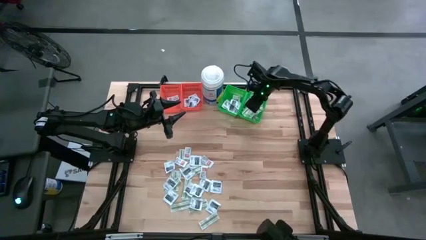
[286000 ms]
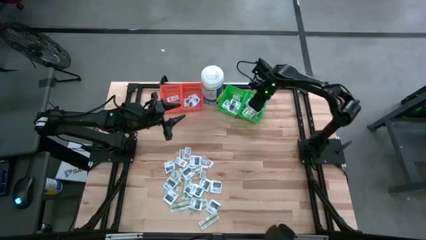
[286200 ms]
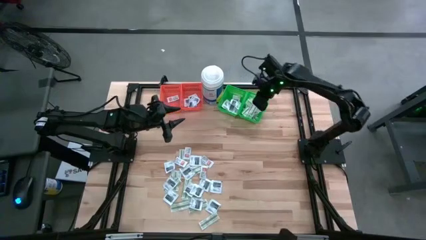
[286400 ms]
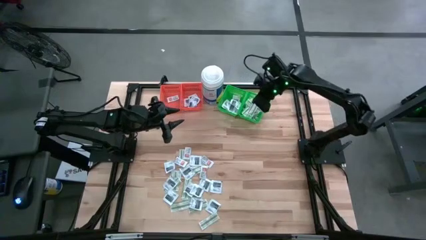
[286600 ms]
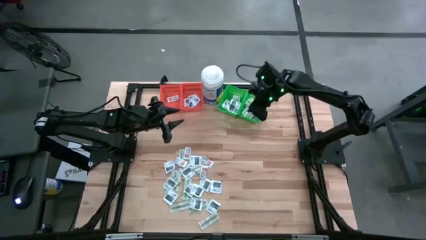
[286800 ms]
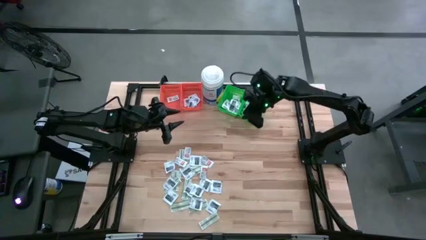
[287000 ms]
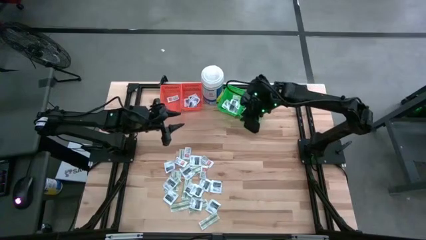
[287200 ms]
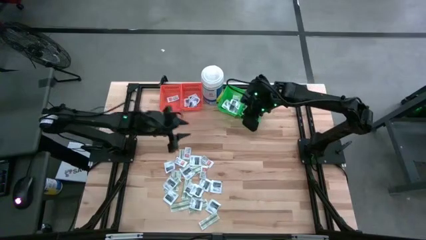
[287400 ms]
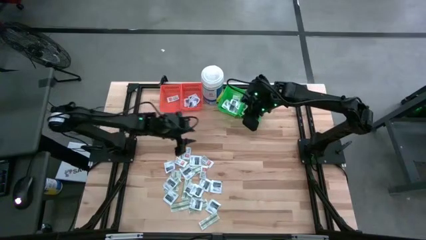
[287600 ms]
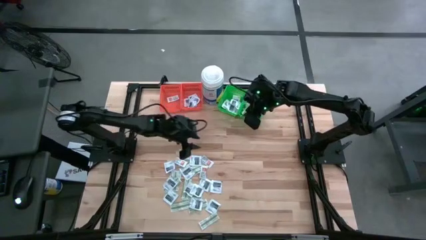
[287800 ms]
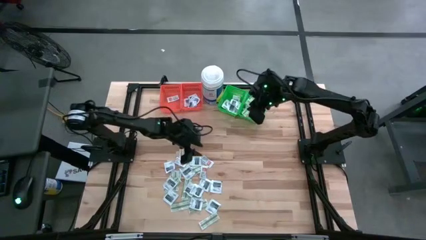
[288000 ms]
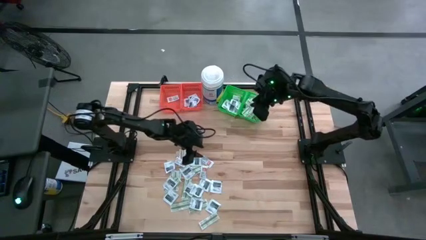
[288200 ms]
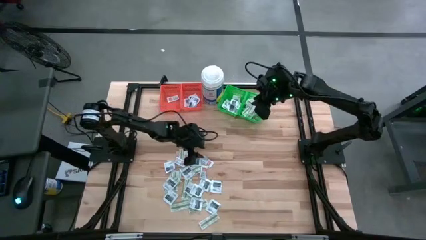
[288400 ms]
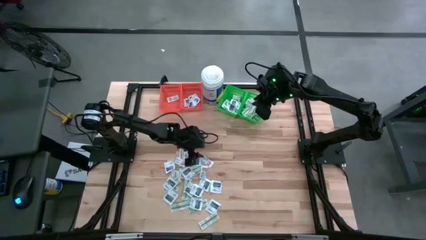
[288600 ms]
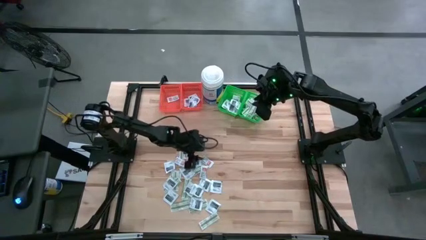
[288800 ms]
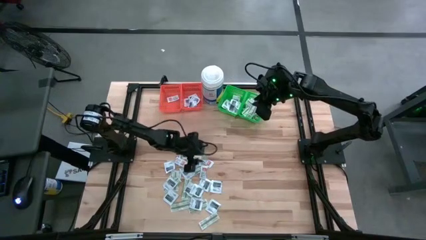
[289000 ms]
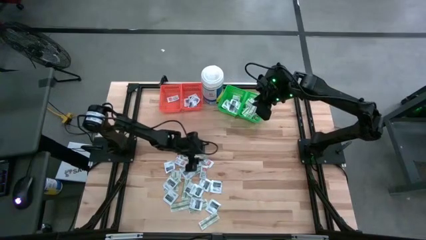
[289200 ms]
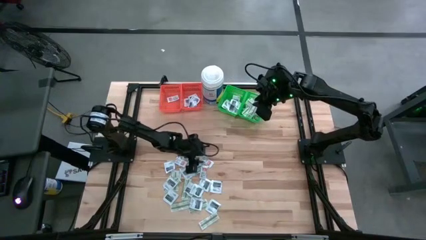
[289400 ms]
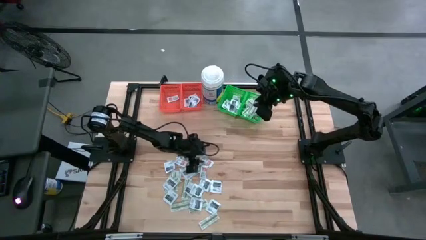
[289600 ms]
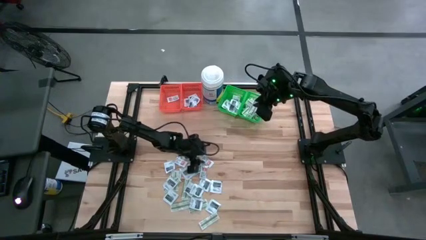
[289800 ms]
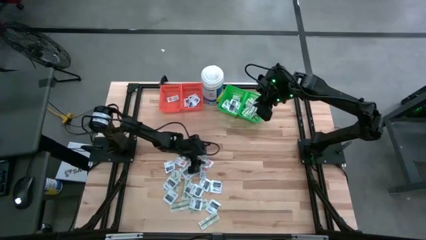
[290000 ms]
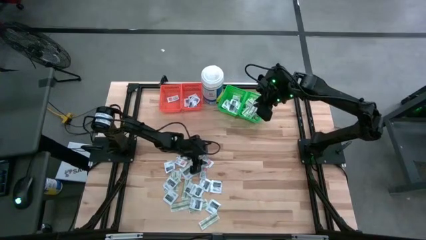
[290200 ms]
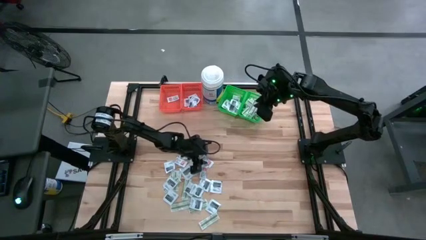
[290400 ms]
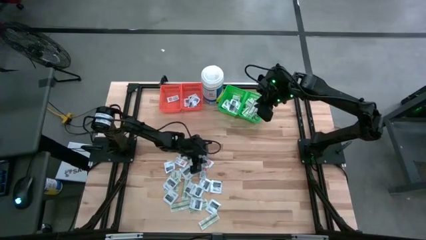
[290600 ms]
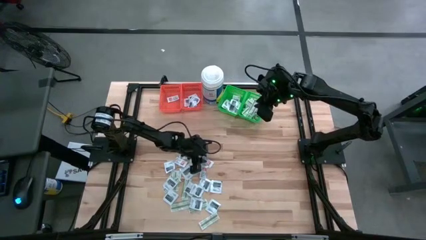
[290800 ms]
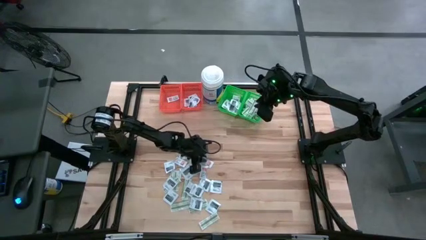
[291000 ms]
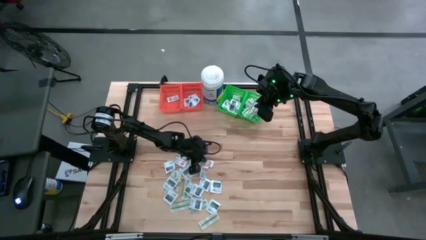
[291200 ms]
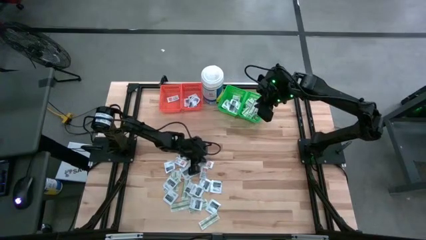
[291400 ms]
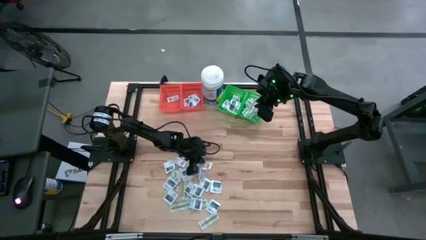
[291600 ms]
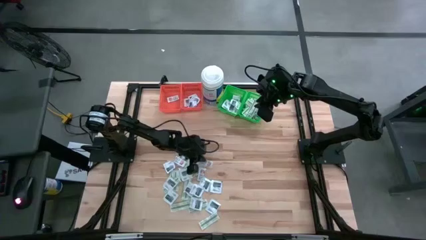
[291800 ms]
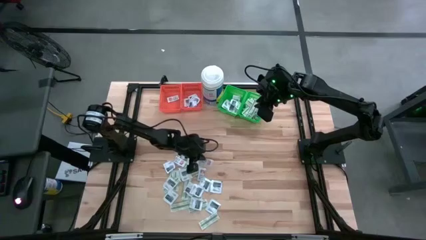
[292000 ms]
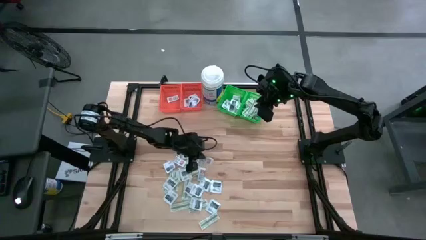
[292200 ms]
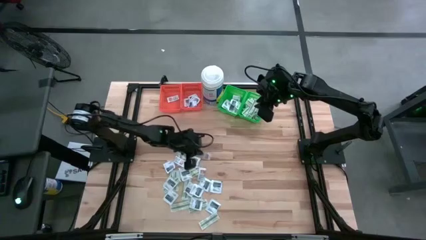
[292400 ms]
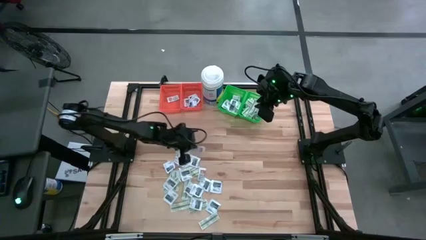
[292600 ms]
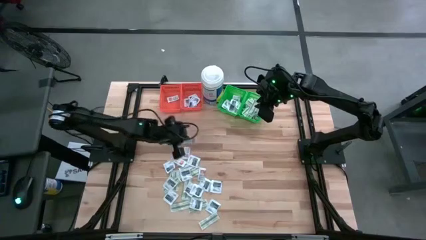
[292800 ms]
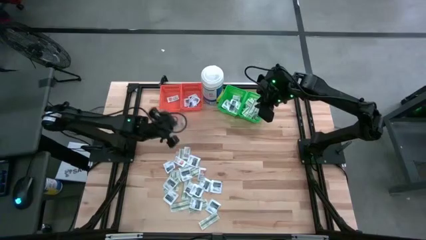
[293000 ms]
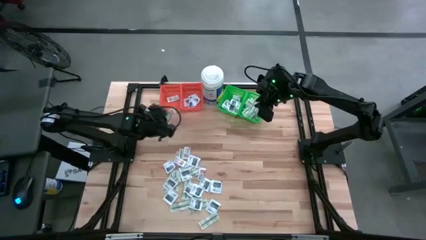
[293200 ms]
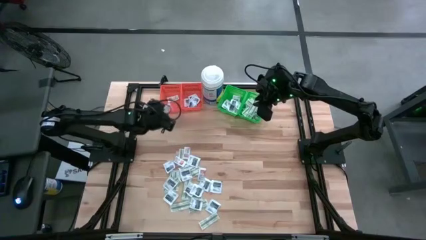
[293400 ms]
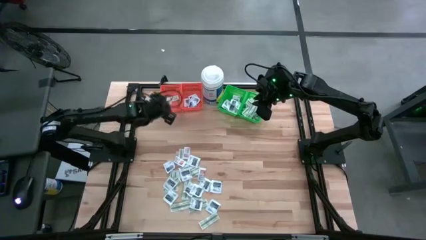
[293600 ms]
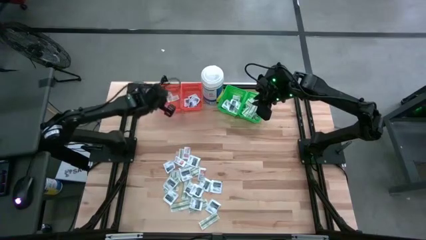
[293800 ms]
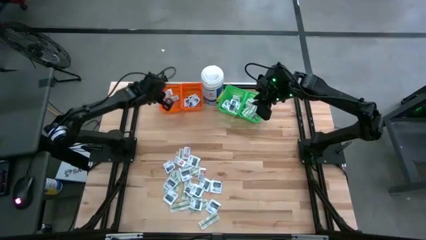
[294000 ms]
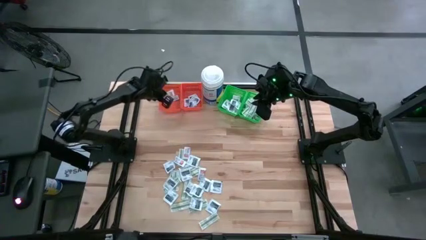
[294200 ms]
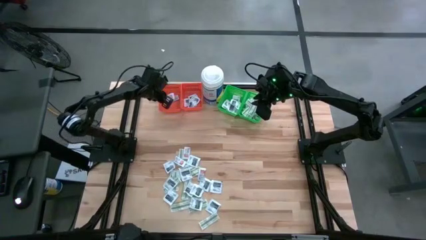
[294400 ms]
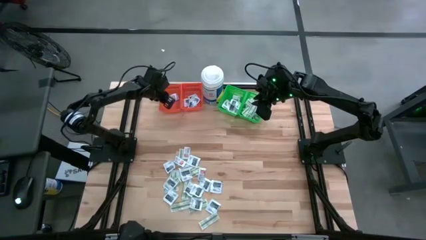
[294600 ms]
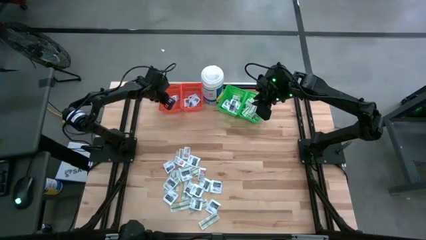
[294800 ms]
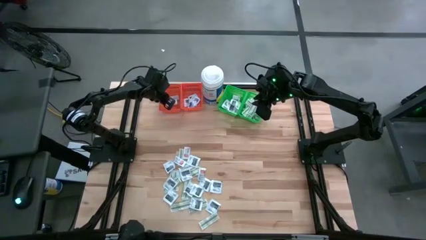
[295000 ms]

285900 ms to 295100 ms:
Task: Pick & Place First Aid Supplies
Put the orange ointment pack into the left orange bin

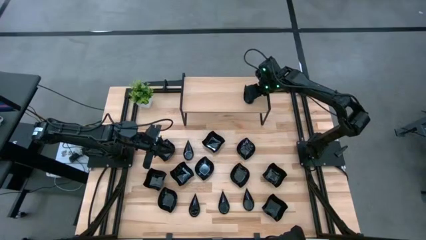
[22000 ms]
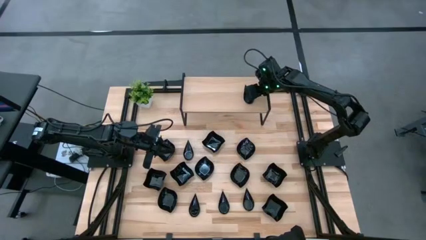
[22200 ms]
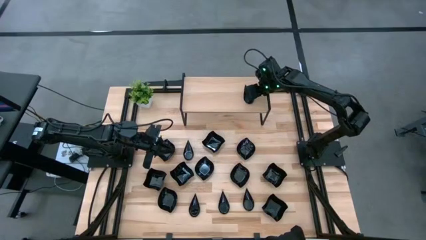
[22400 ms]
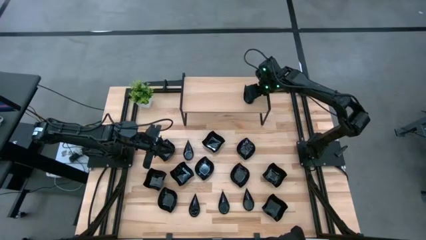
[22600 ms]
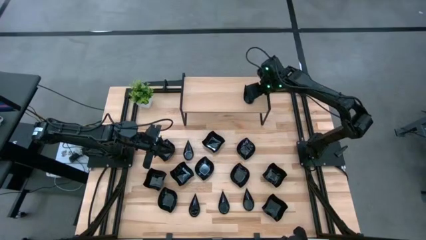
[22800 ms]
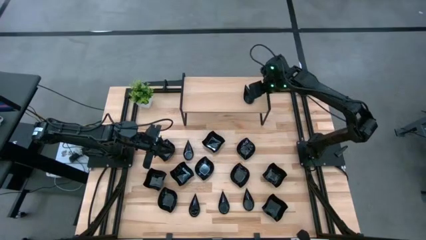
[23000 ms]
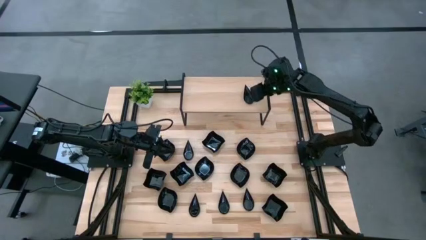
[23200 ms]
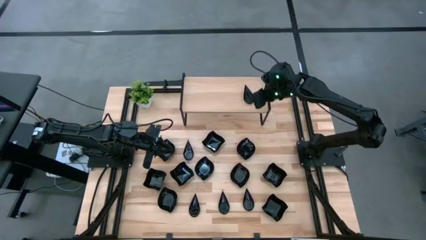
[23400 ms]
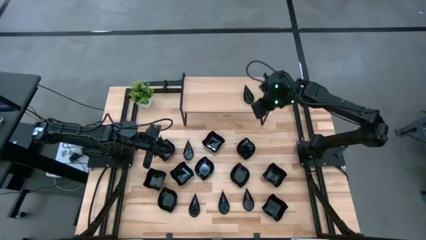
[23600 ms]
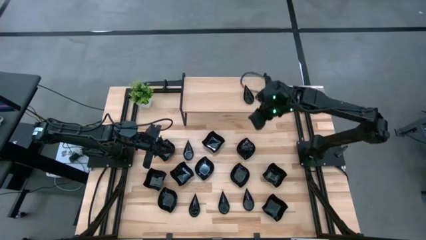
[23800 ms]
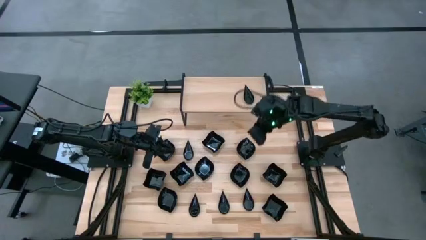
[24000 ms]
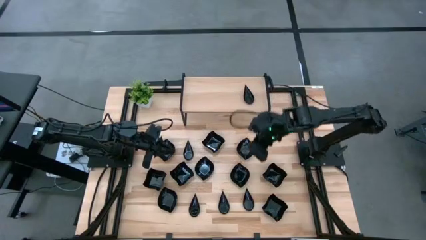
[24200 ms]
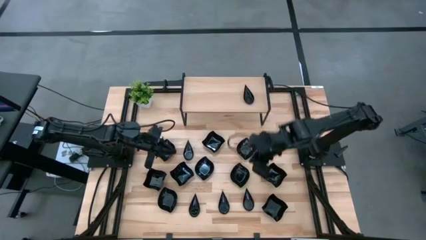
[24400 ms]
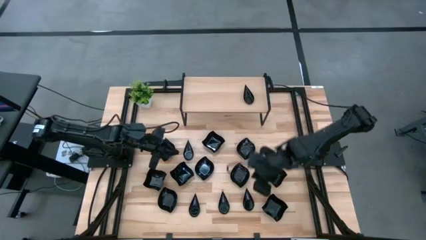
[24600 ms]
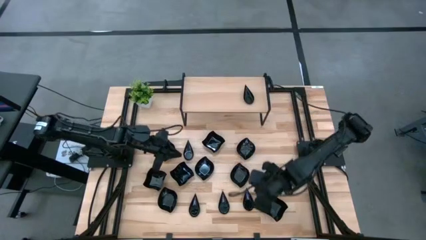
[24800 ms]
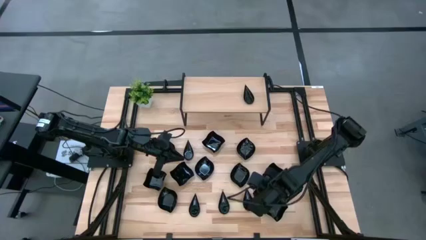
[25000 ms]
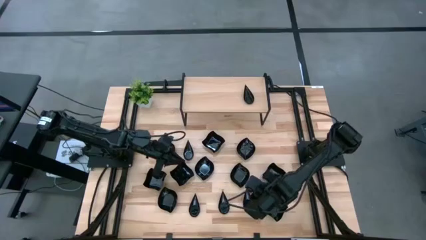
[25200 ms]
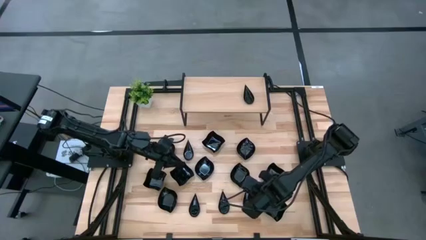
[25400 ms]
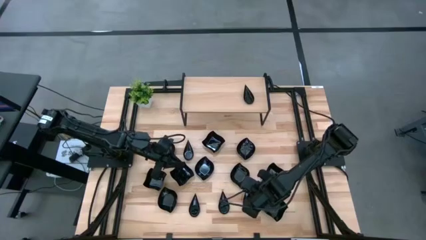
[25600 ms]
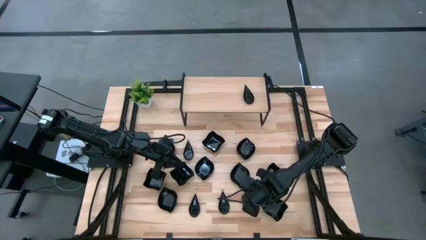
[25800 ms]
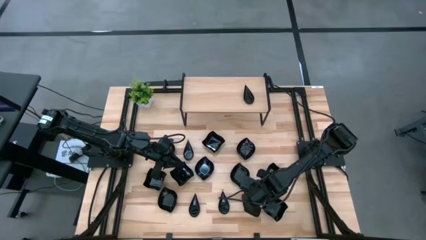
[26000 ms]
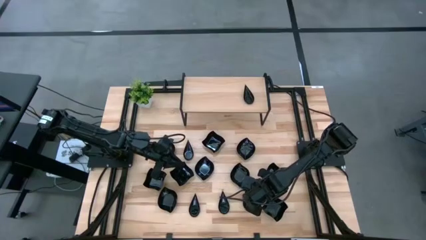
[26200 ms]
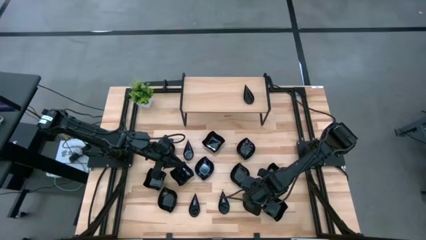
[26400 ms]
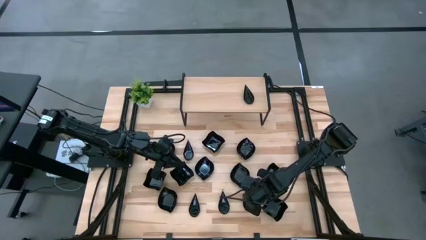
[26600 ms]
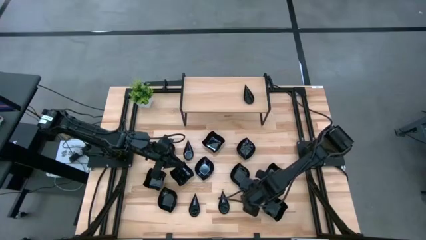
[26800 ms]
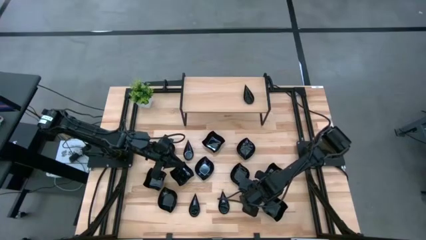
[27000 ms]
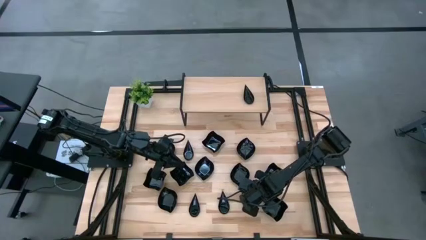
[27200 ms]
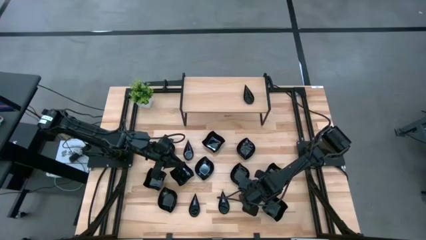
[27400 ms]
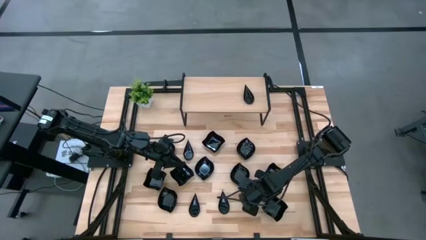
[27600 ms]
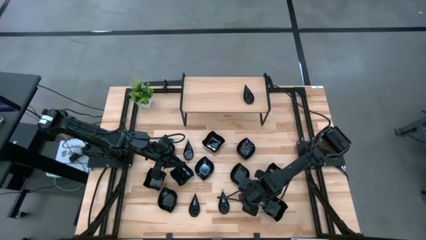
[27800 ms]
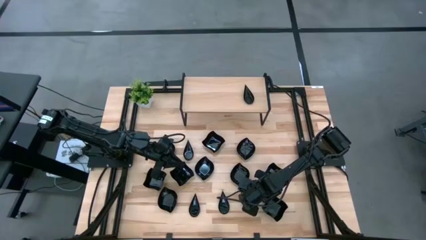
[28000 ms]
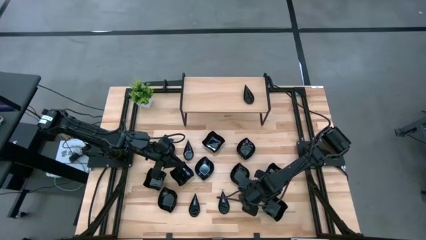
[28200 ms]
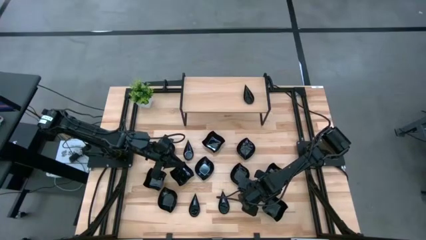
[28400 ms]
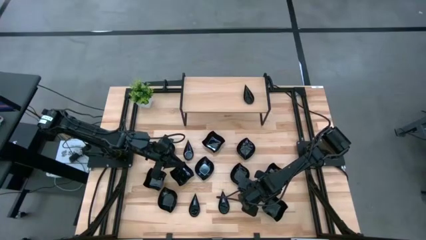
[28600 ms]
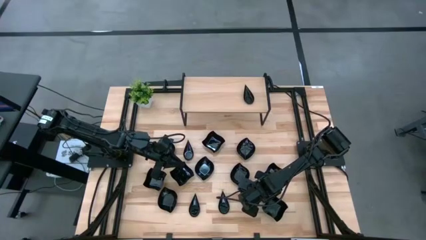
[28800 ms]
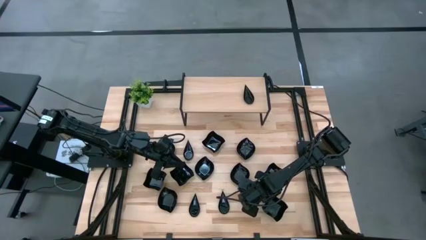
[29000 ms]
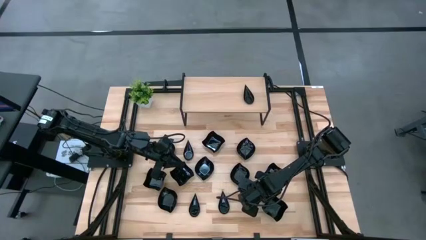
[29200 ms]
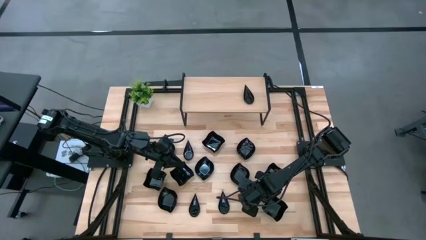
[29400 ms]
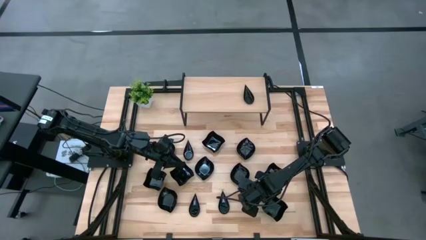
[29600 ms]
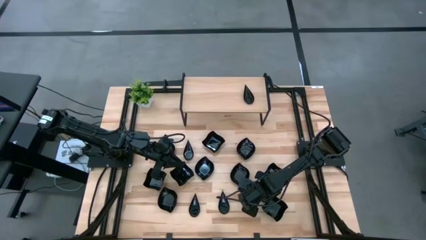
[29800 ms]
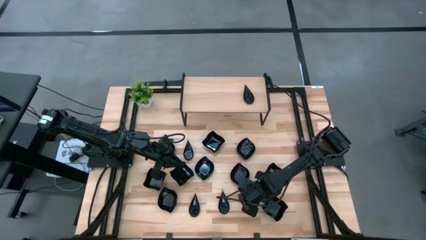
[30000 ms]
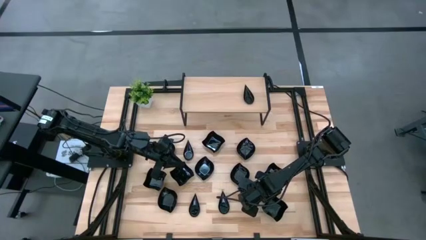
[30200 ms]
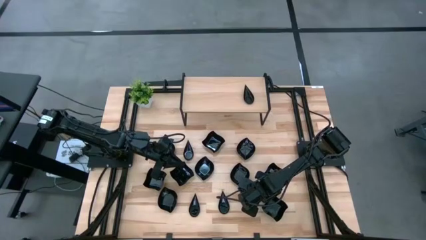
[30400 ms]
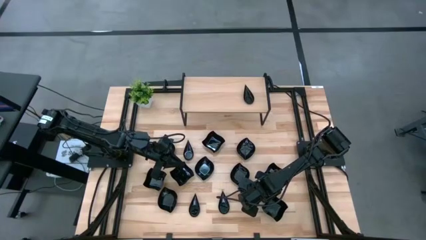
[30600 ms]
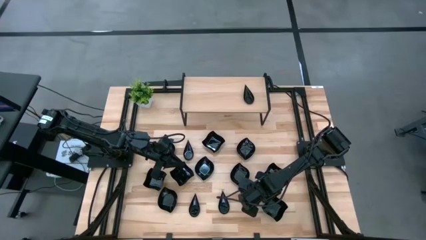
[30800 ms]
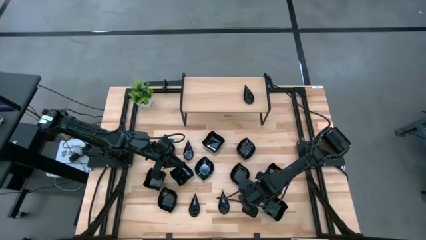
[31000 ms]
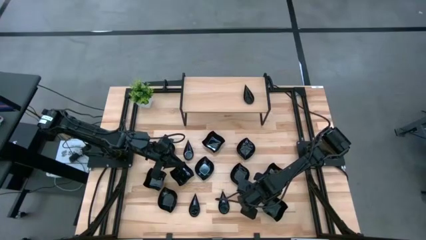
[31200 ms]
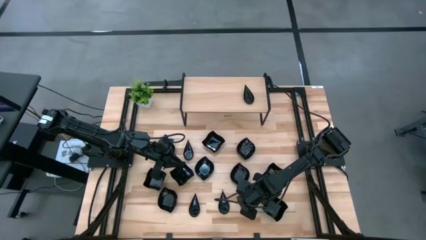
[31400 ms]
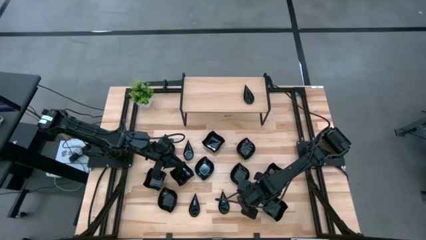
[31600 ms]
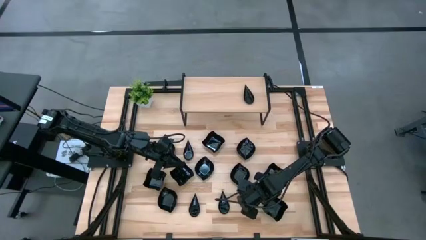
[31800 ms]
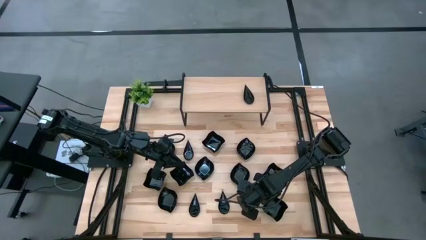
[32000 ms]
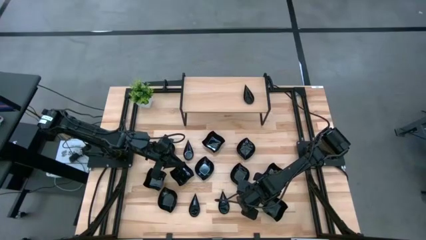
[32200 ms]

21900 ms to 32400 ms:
Task: Pick & Place Mini shaped plates
Stack the black drop shaped plate on top of the black drop shaped plate on the shelf
